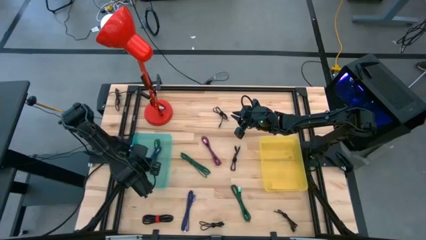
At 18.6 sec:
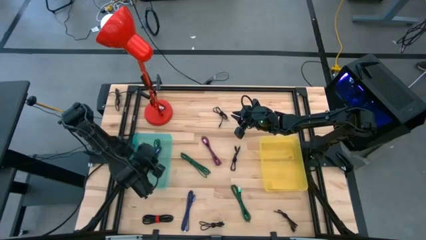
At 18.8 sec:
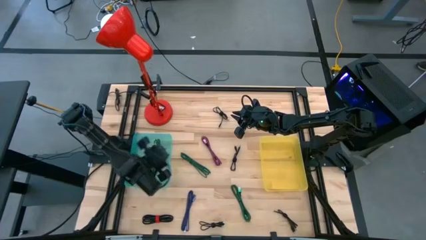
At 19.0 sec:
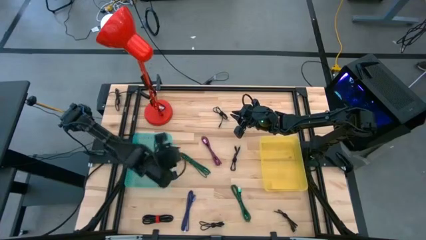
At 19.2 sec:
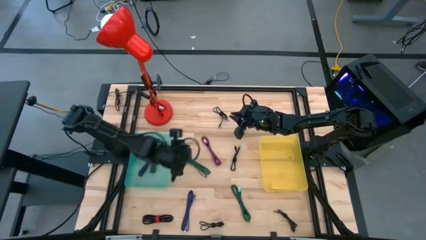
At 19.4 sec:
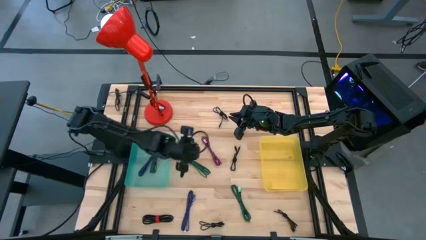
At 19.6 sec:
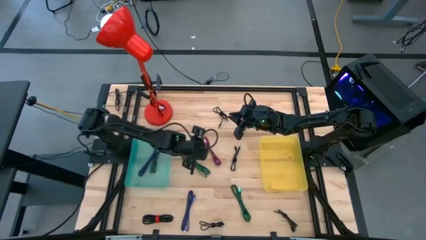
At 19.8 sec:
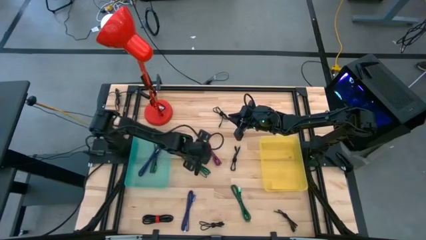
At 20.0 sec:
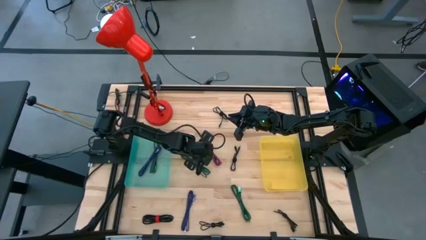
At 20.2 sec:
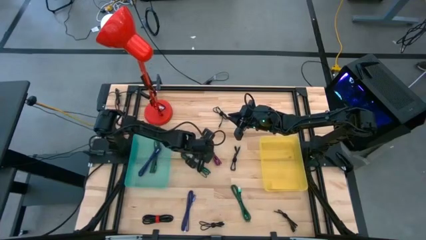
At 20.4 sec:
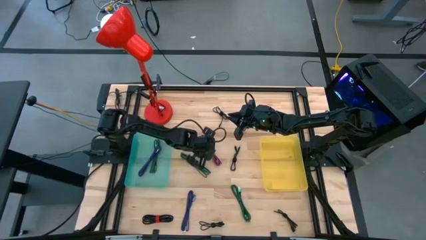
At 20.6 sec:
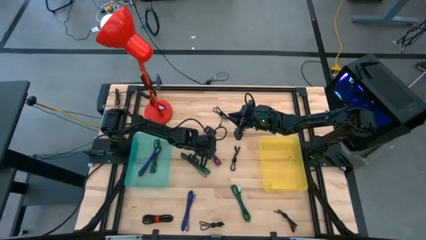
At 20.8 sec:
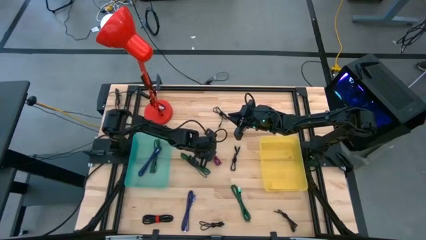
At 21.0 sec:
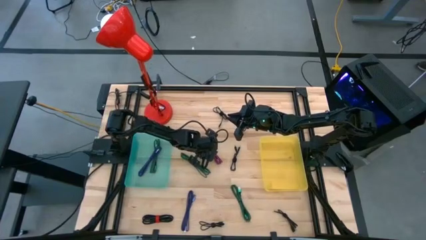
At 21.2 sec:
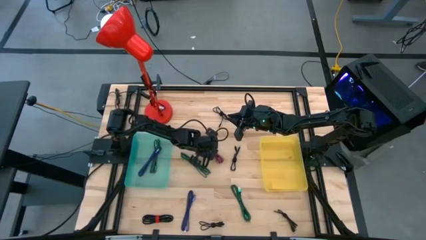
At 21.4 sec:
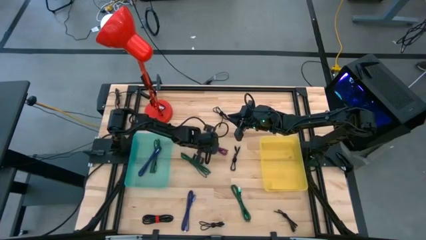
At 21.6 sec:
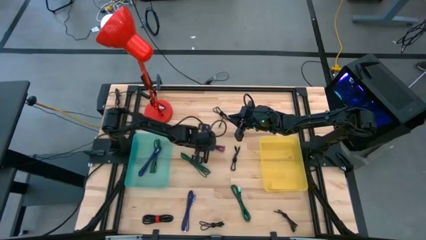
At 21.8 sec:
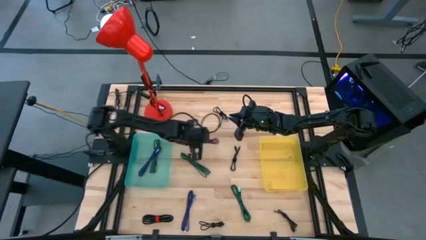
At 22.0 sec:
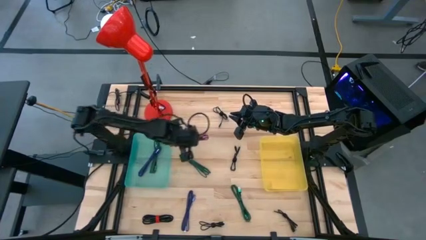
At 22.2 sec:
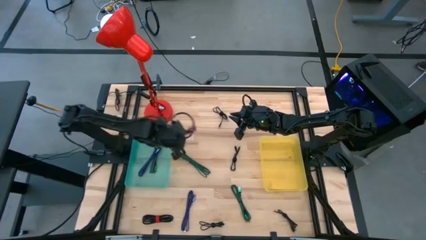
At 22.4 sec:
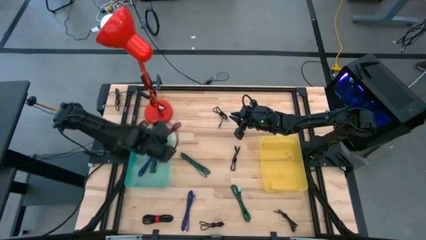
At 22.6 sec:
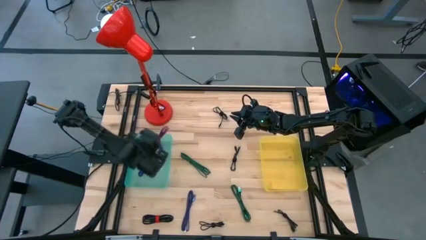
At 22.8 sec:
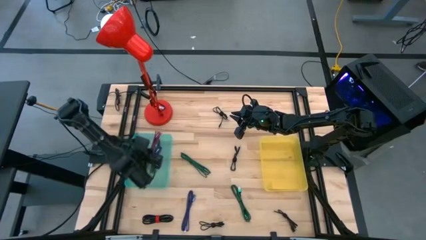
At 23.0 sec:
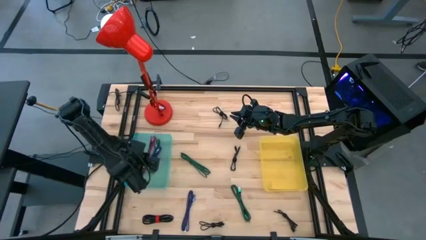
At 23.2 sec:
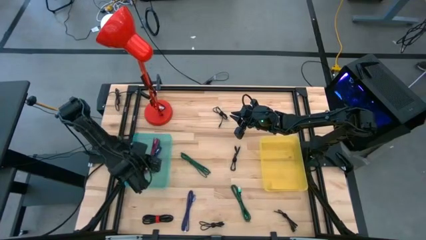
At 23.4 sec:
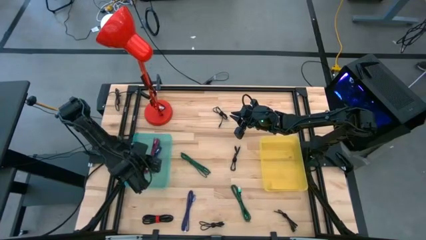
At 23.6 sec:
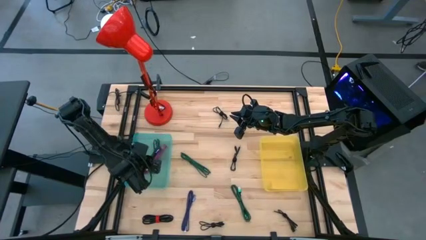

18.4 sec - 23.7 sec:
Task: Pick & Place USB Port
Put the red charger cable into the green bin

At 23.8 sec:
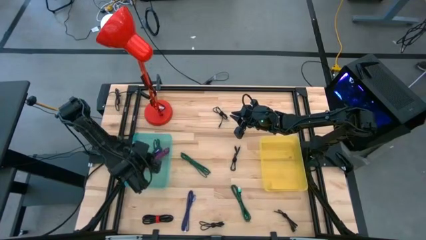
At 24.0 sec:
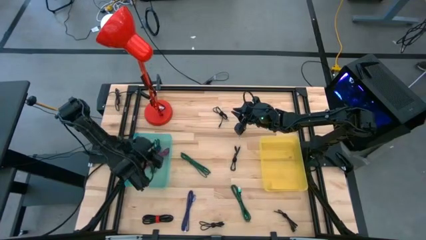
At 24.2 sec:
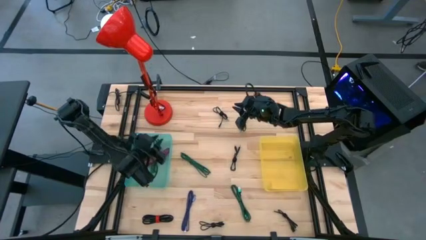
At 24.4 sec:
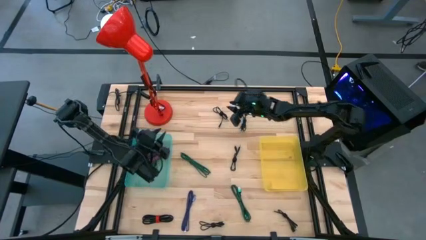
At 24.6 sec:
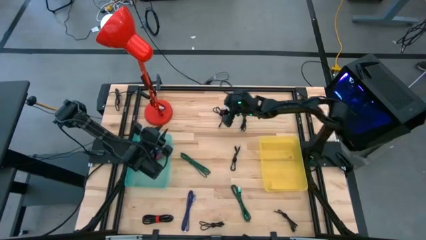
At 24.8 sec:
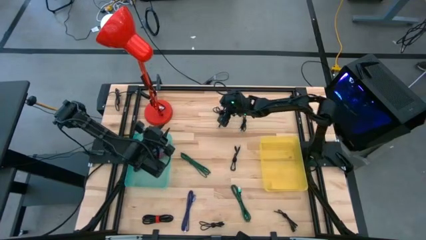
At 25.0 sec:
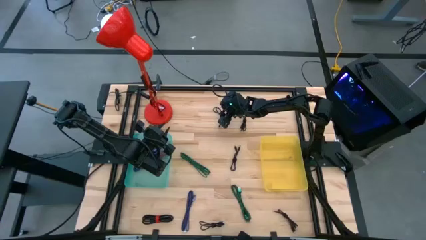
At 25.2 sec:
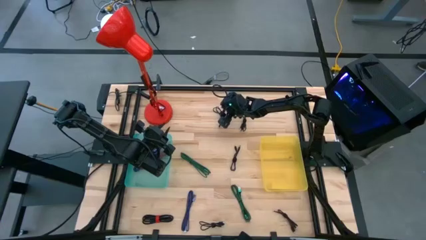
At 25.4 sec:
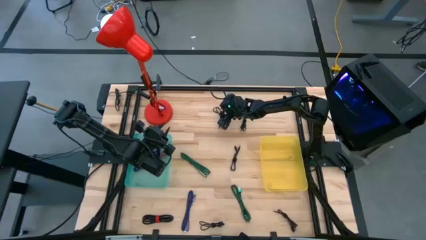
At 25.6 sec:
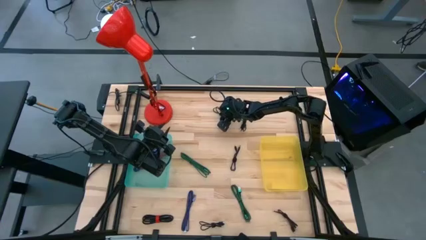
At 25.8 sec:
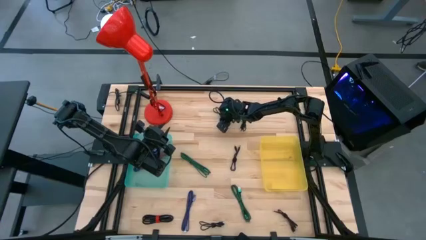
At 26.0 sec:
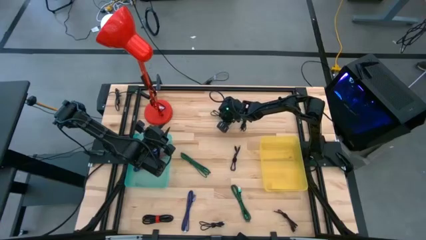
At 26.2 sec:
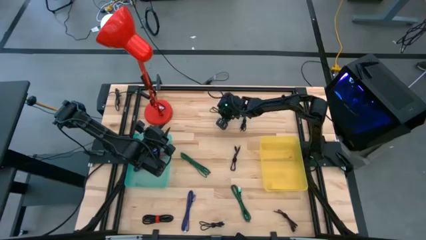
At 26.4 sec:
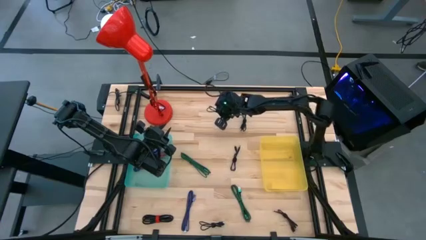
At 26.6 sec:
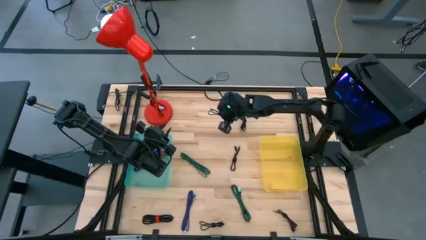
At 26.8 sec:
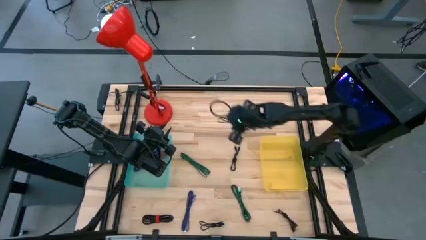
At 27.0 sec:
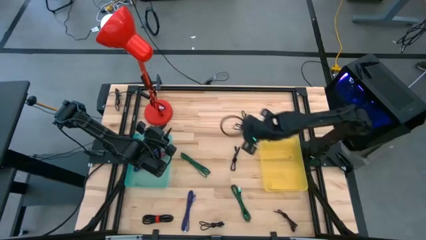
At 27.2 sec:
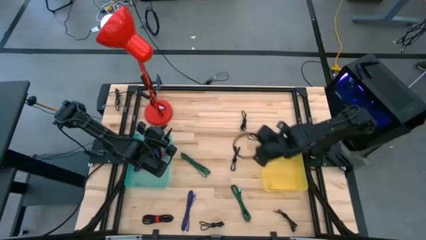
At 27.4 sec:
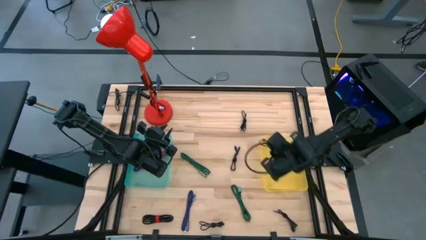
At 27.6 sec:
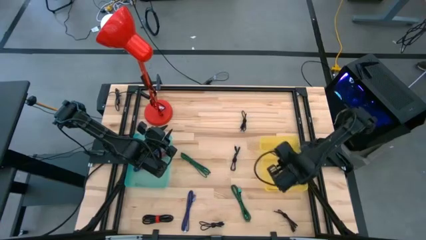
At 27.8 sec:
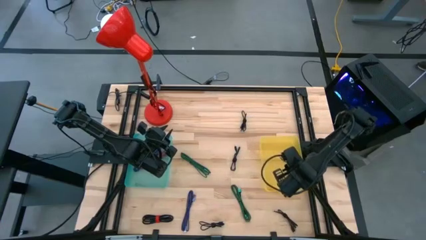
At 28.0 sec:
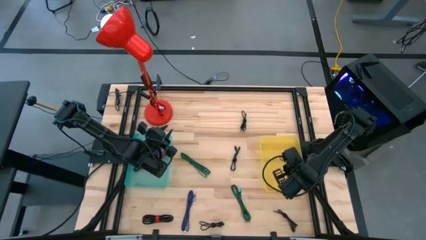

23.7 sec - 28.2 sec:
Put the black charger cable into the yellow bin

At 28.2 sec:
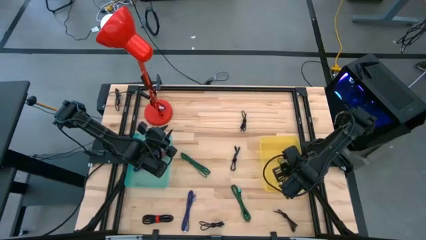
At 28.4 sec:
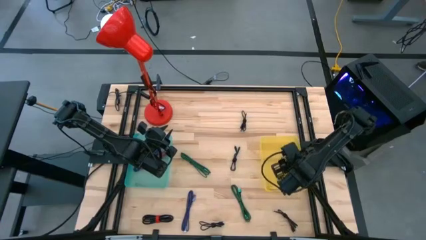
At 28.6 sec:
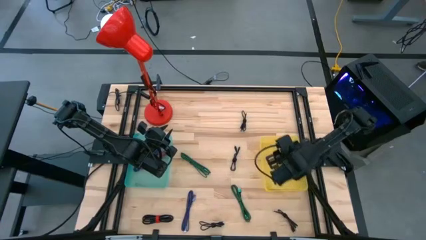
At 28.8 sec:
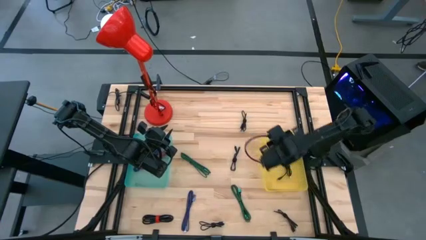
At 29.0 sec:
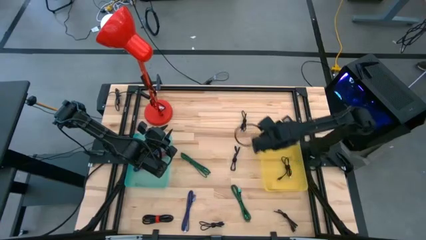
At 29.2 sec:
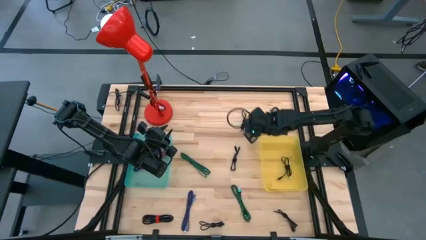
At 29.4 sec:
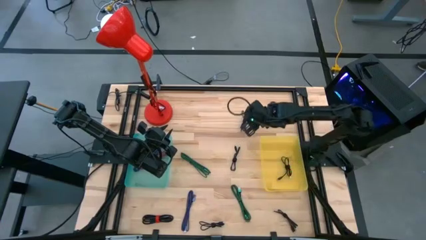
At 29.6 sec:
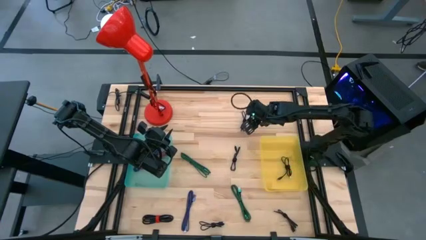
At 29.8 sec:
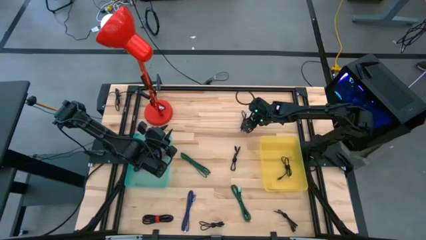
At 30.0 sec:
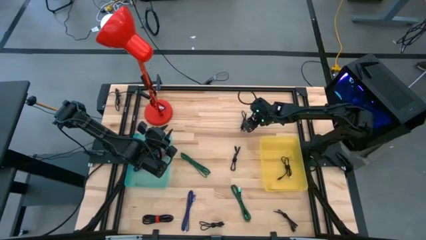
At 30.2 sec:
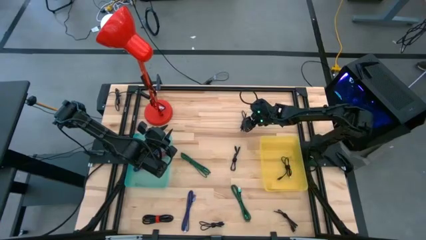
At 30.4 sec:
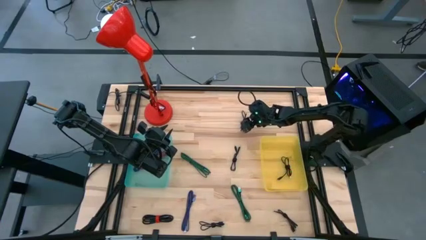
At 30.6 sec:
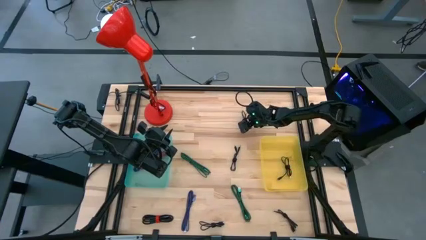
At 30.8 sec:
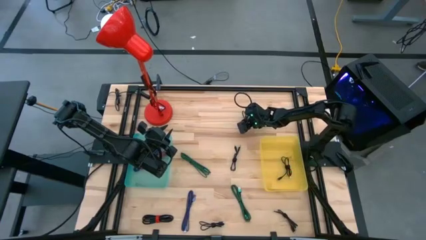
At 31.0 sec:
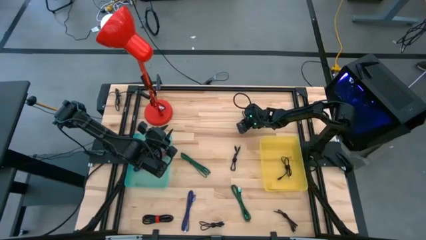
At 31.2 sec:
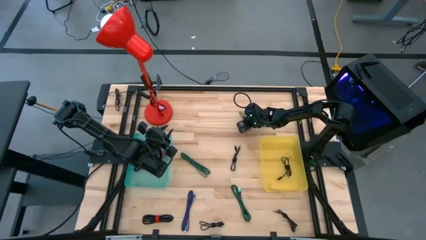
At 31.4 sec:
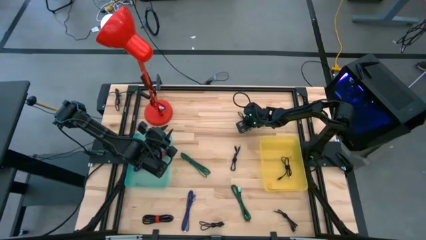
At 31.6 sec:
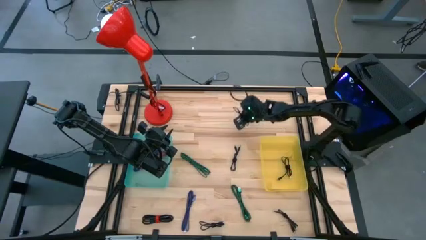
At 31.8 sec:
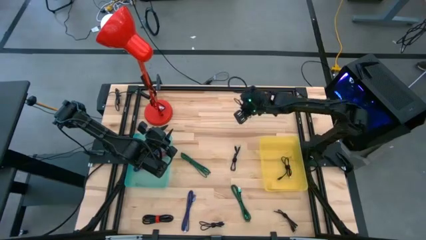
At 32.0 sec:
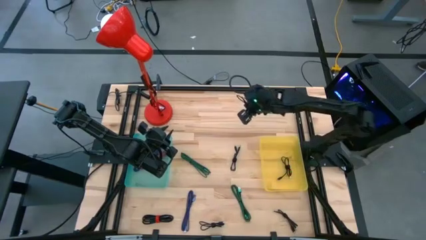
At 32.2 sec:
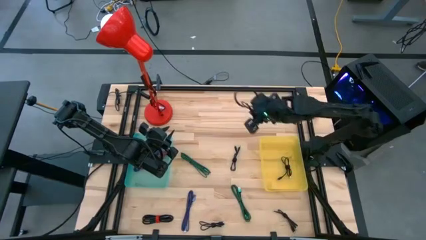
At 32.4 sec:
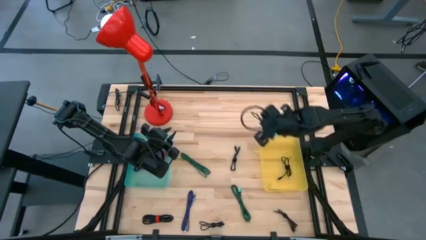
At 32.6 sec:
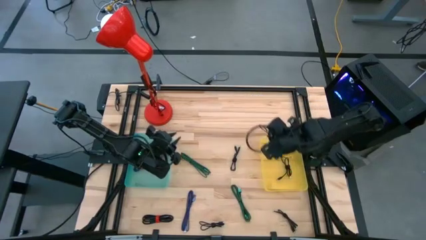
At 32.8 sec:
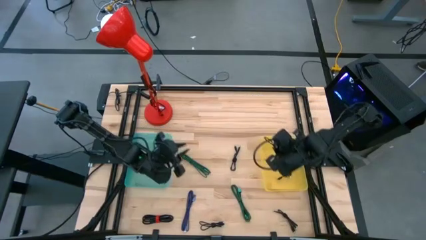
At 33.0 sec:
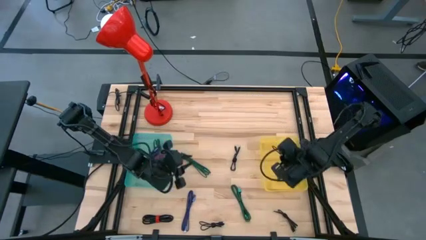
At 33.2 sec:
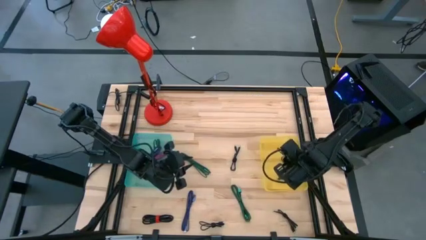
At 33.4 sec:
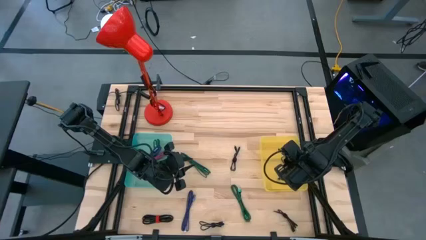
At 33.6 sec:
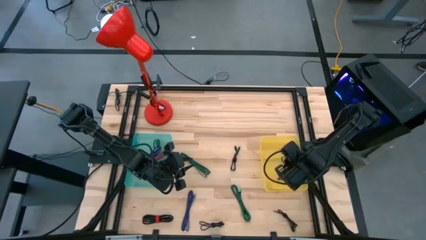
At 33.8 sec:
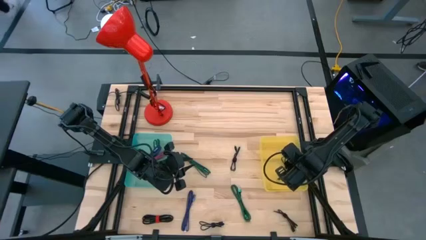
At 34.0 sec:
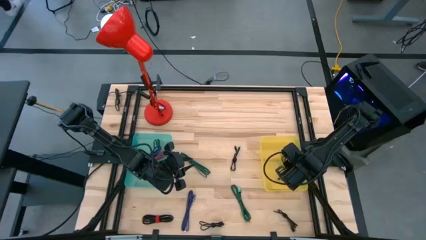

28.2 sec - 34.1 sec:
Put the black charger cable into the yellow bin
